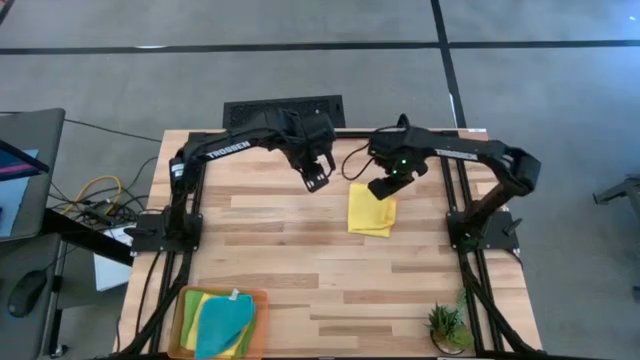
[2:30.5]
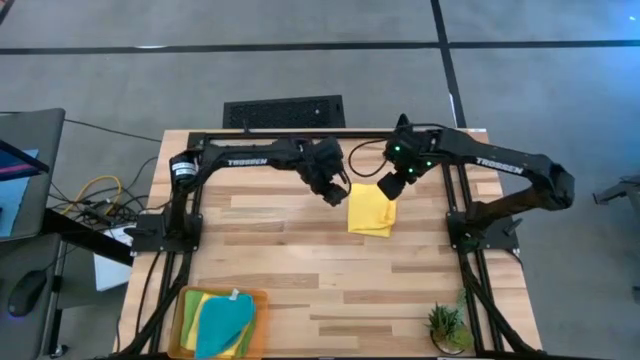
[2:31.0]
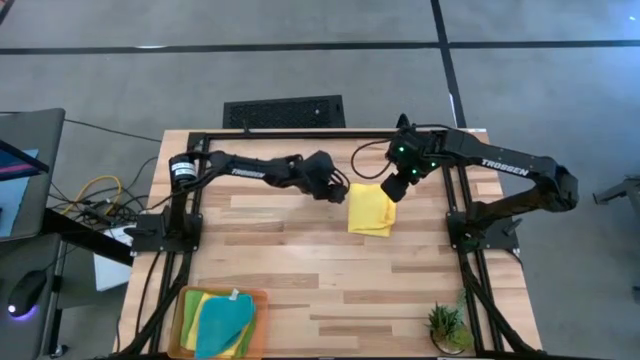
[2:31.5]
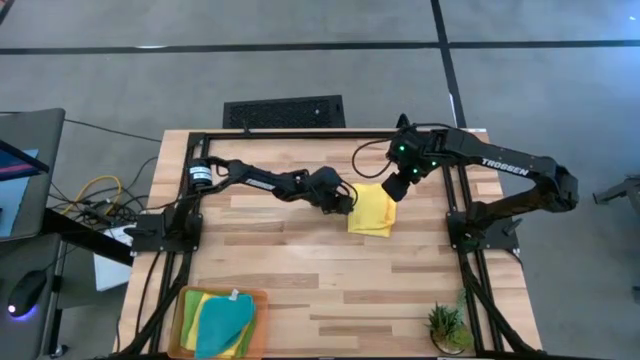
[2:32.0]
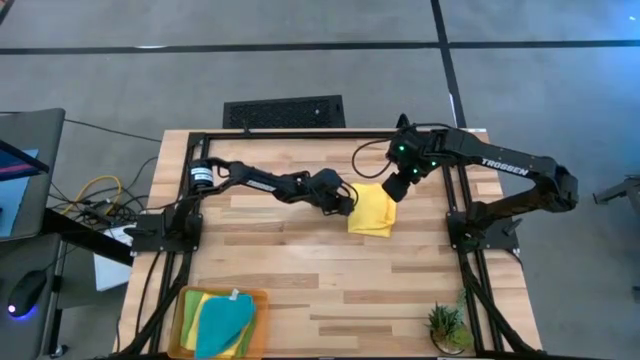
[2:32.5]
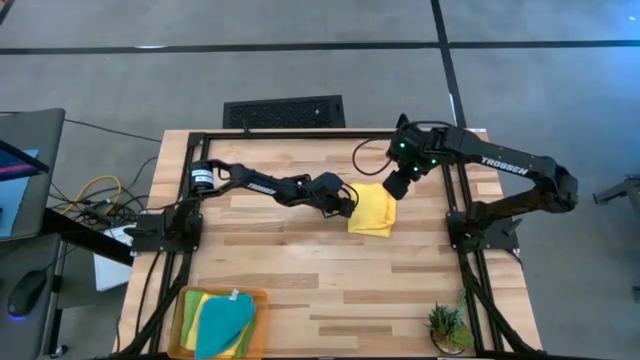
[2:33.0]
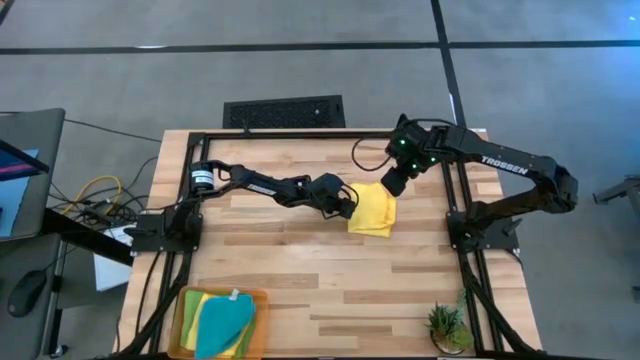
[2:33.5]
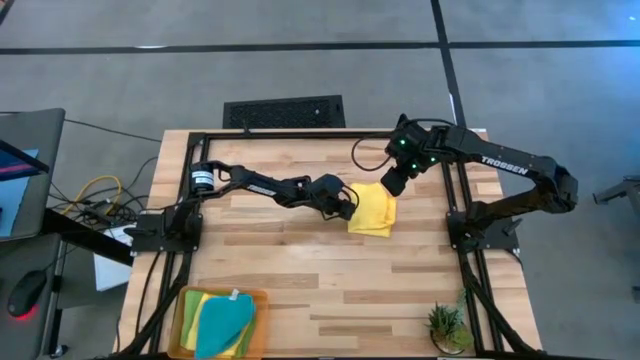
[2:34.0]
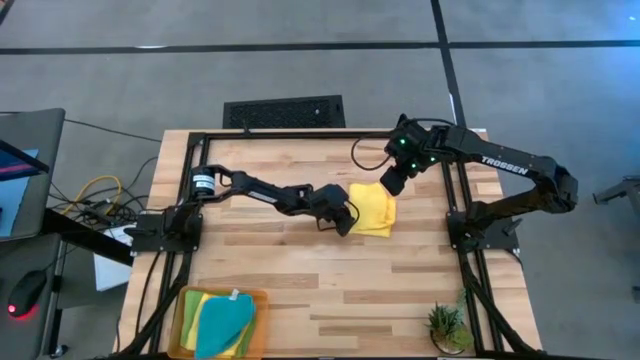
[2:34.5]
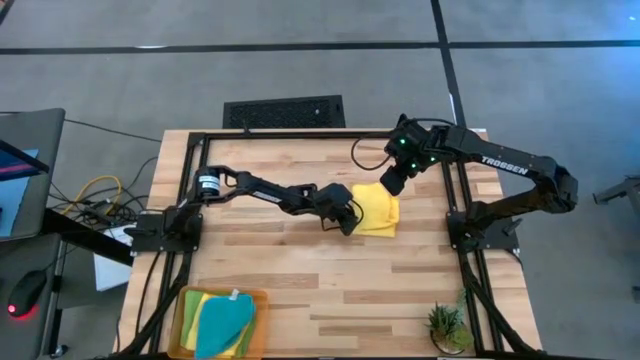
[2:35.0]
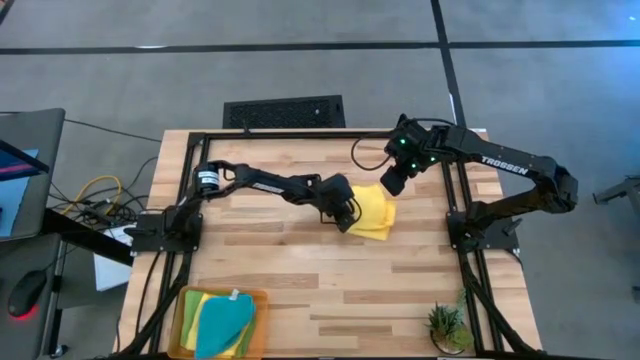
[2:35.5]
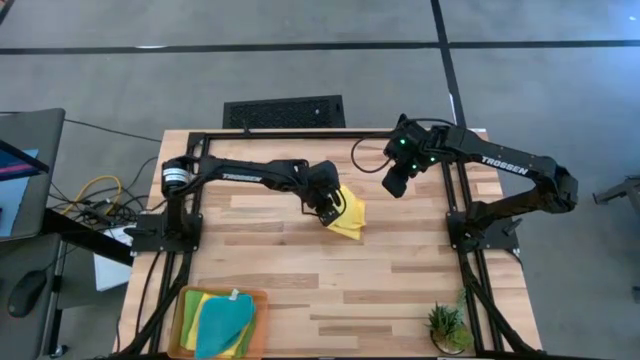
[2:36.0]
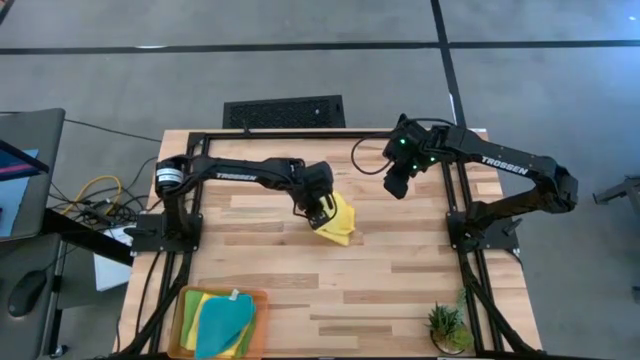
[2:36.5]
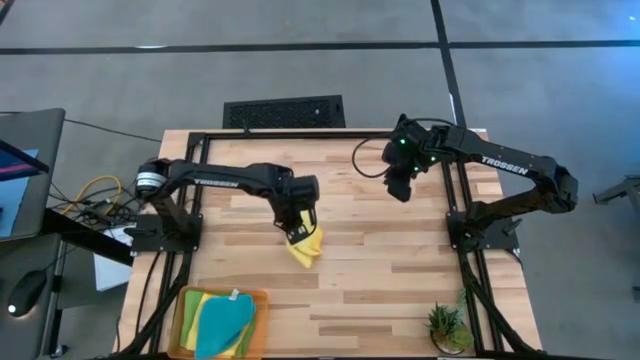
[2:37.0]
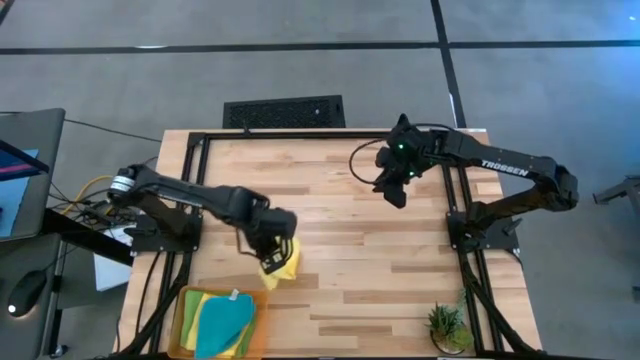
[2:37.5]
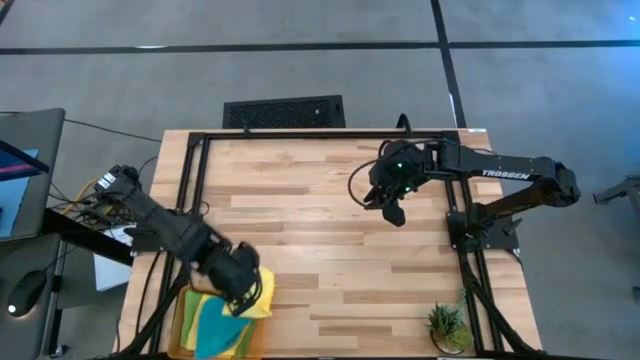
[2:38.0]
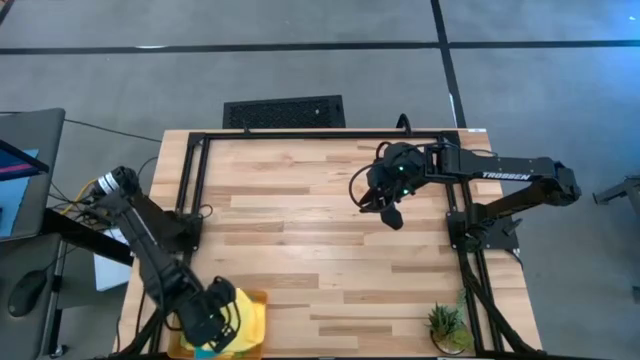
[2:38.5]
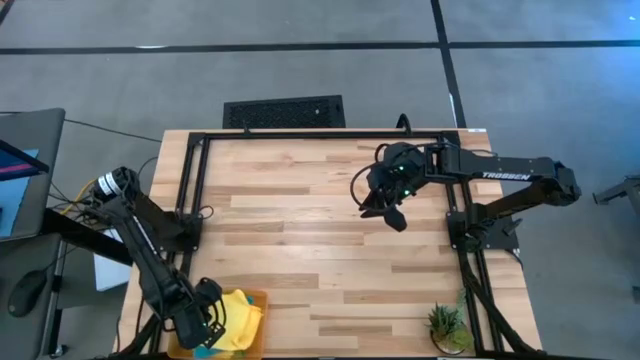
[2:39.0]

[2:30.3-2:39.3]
Task: Fold microfiber towels
Put the yellow microfiber towel into the bin

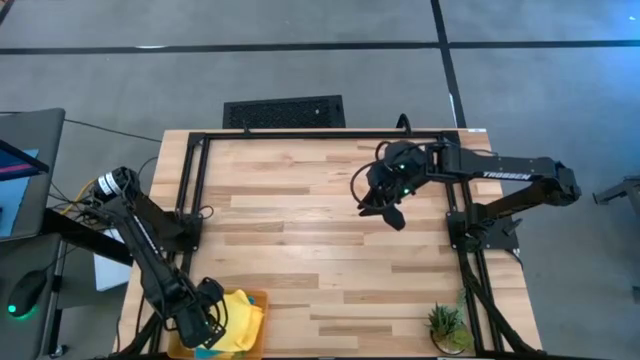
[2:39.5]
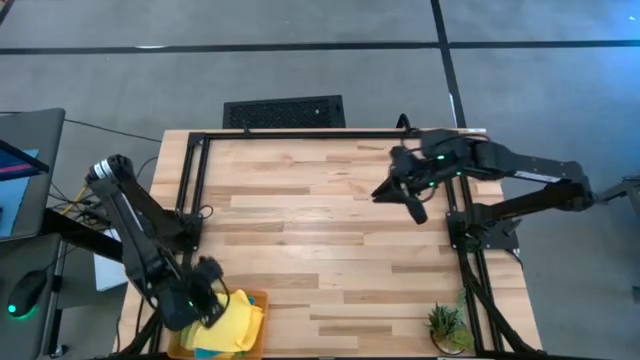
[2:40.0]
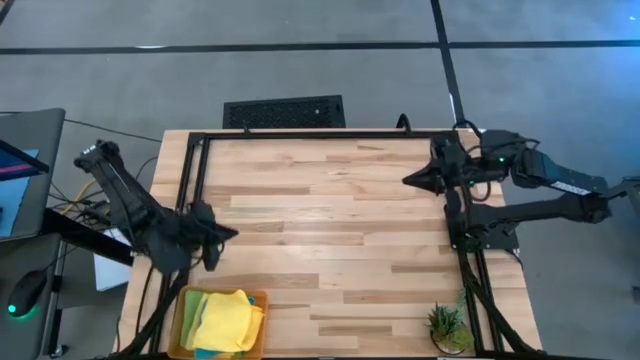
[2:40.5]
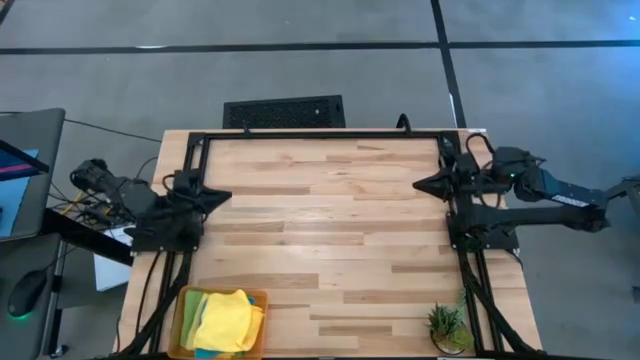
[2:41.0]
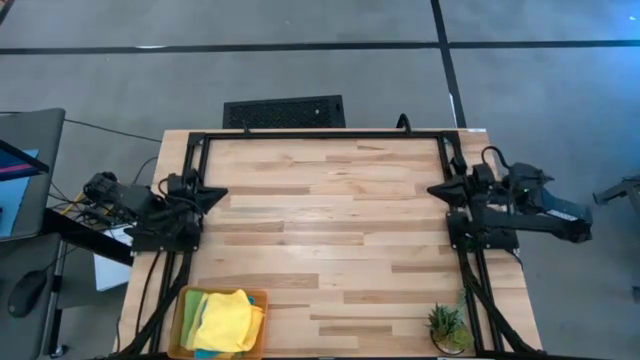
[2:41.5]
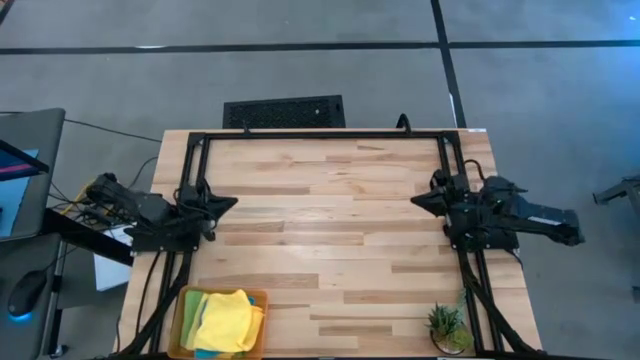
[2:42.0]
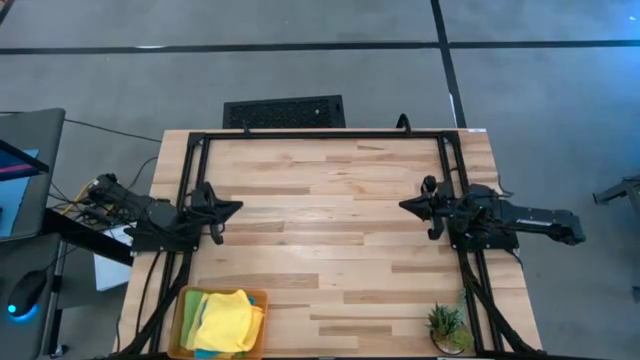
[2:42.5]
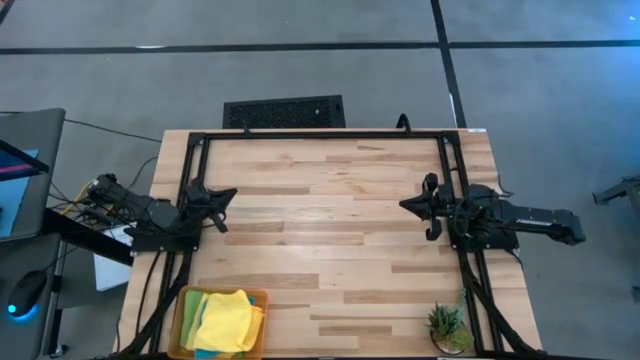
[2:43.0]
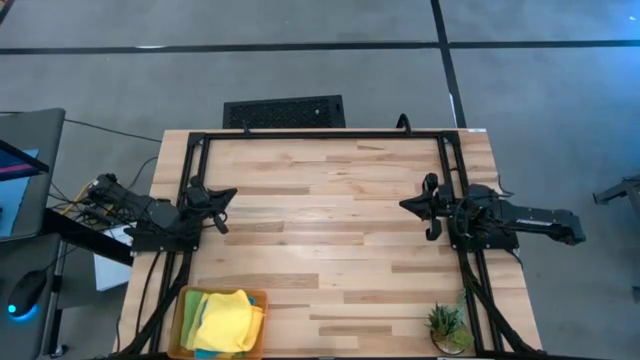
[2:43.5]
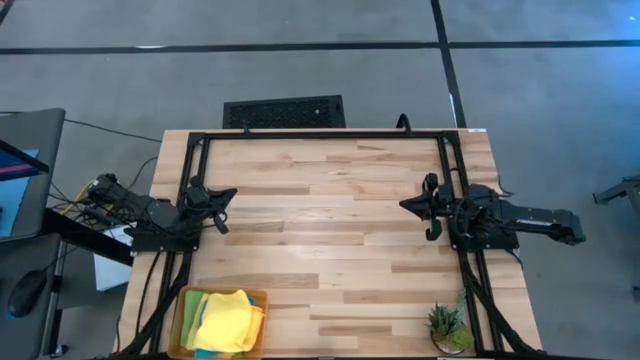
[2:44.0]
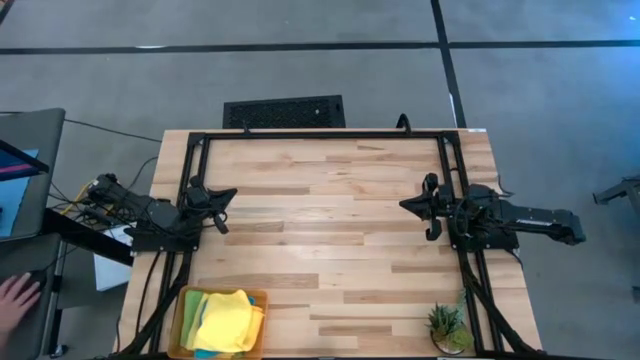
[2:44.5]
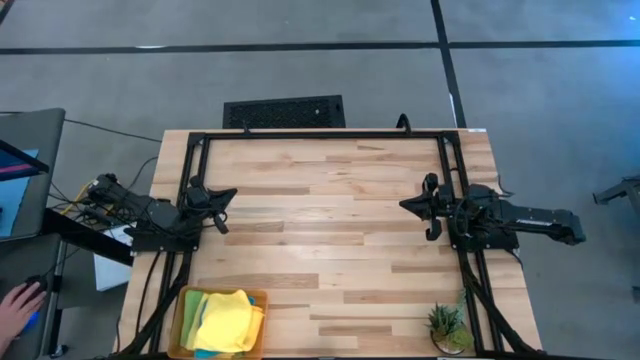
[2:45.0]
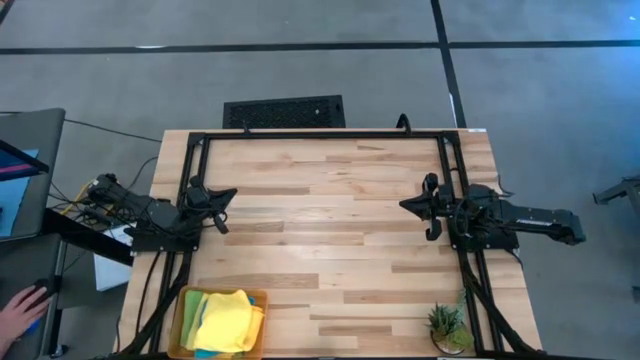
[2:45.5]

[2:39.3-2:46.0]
Return to Home Position

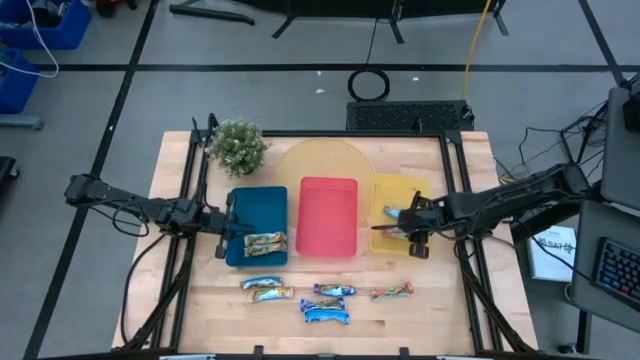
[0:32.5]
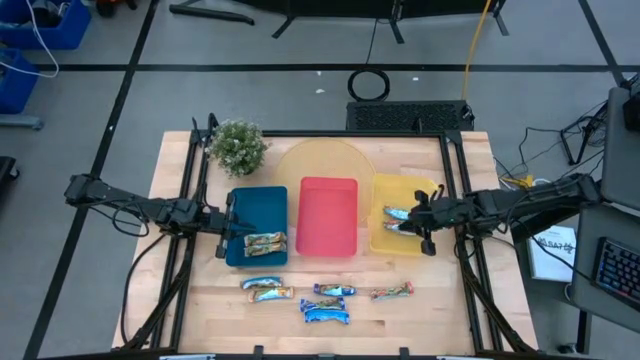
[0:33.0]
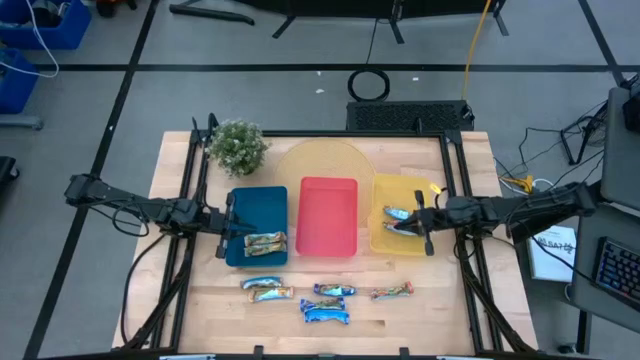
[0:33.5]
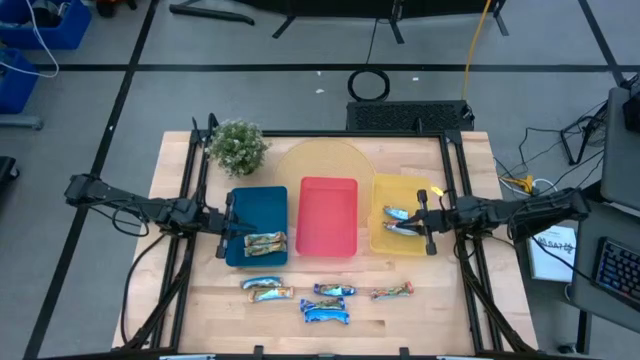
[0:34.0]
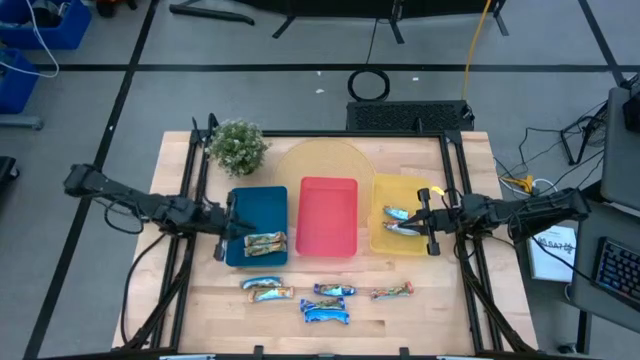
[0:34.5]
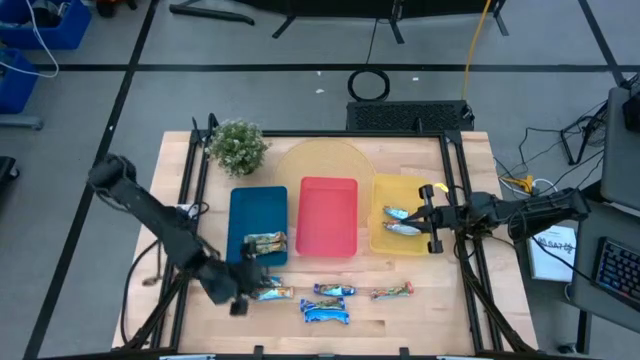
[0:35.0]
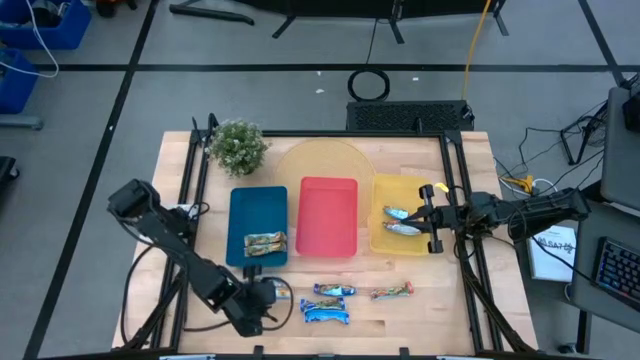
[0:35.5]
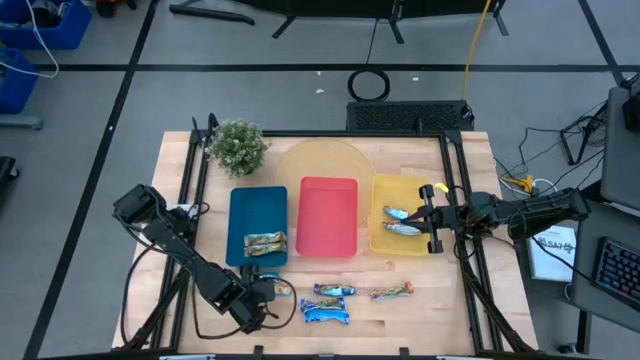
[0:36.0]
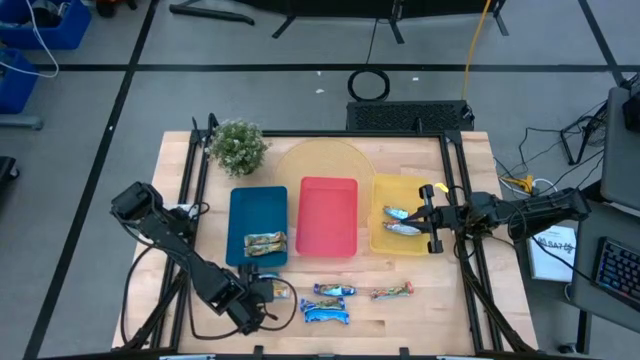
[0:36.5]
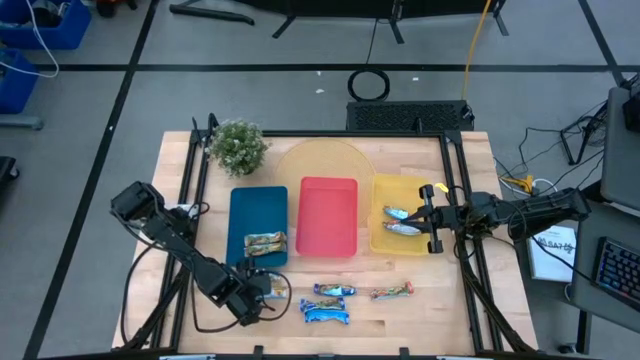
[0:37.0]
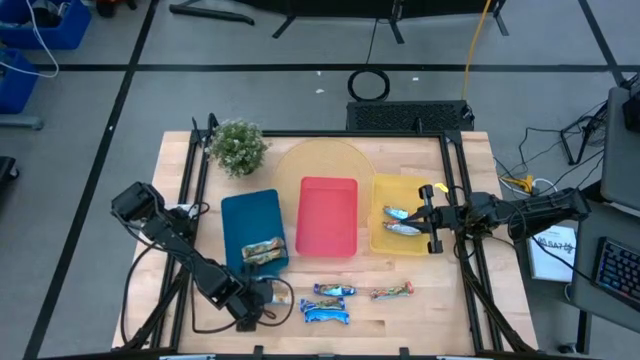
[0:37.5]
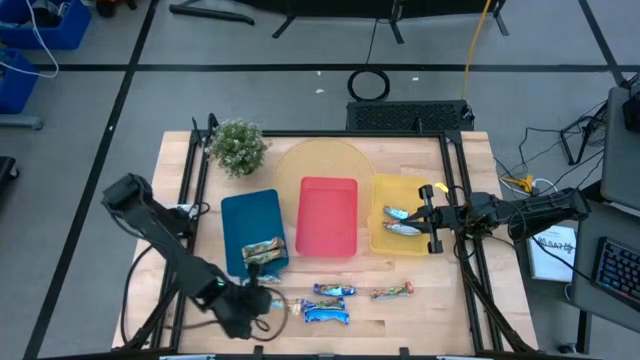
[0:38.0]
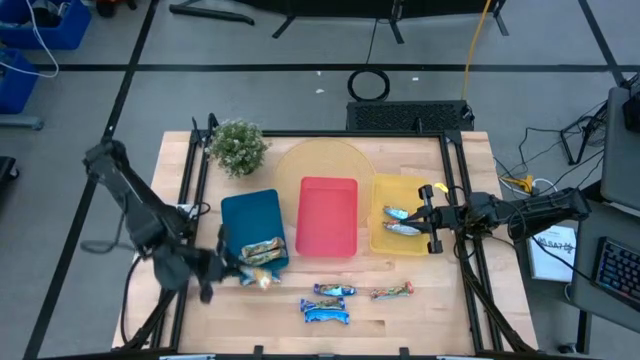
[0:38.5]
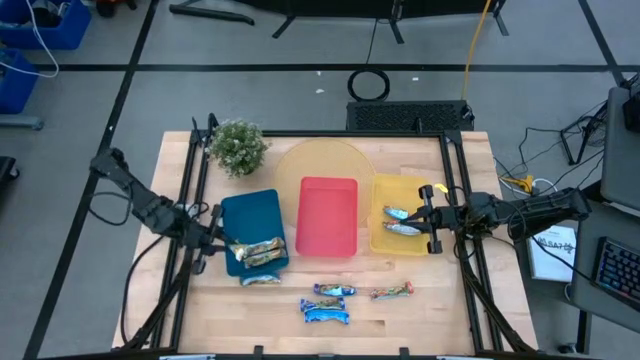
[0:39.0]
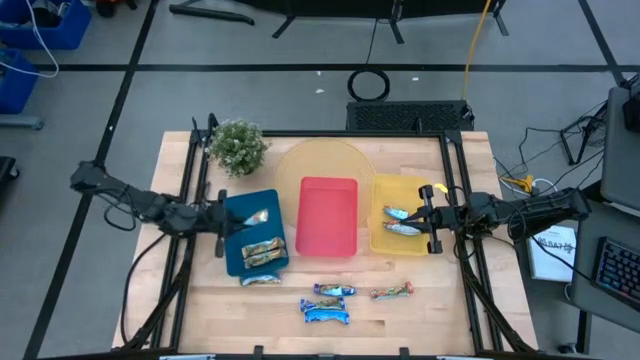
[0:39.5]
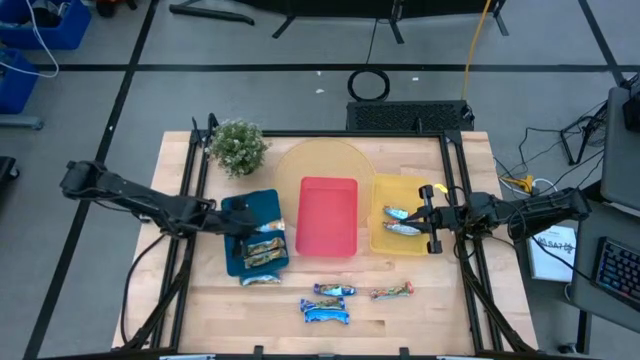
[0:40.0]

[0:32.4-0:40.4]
Task: Pick and place Granola Bars by type
Put the yellow granola bar into the blue bin
